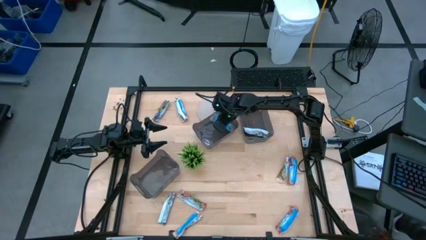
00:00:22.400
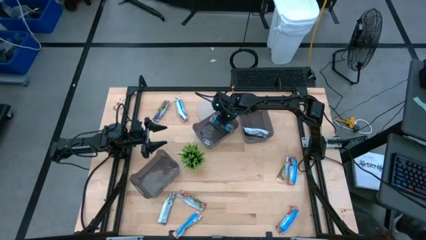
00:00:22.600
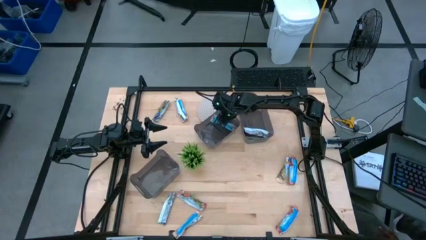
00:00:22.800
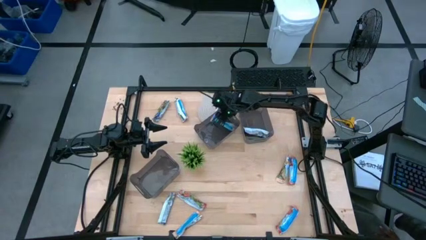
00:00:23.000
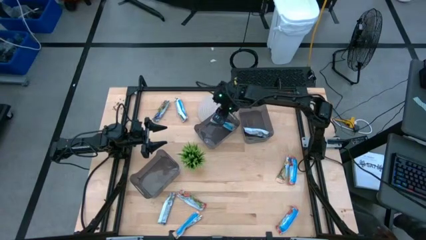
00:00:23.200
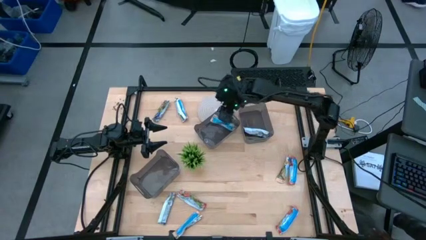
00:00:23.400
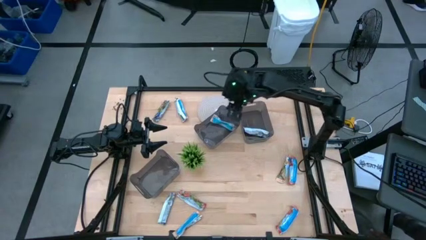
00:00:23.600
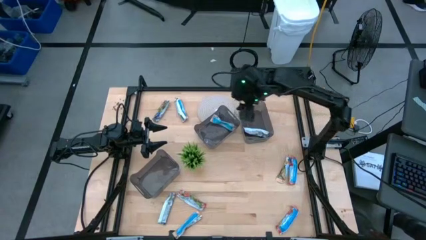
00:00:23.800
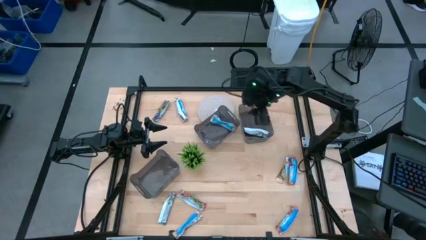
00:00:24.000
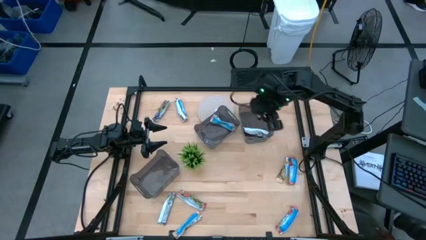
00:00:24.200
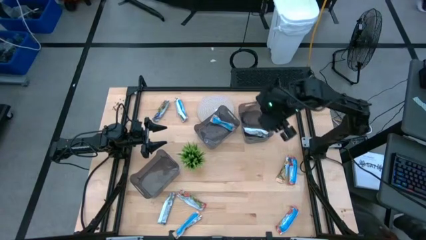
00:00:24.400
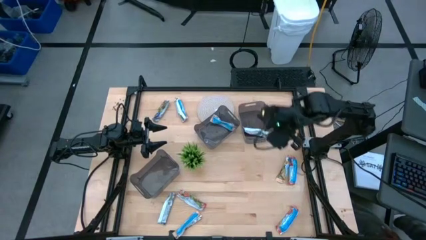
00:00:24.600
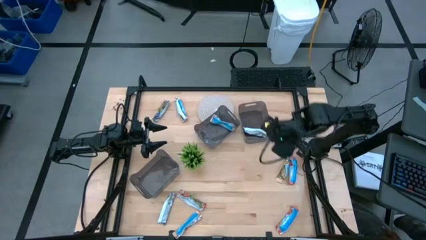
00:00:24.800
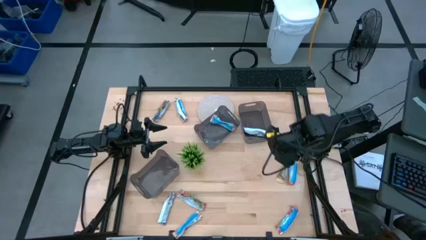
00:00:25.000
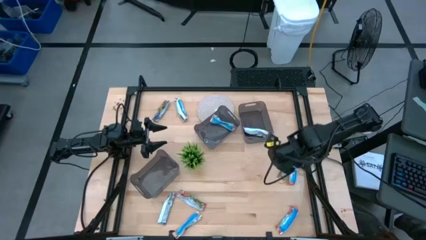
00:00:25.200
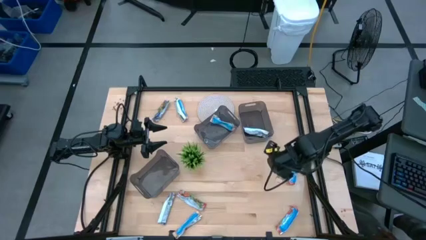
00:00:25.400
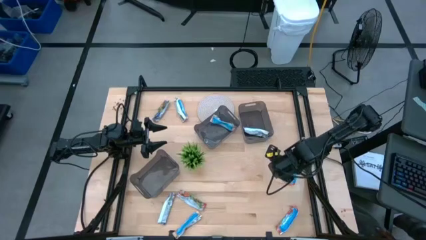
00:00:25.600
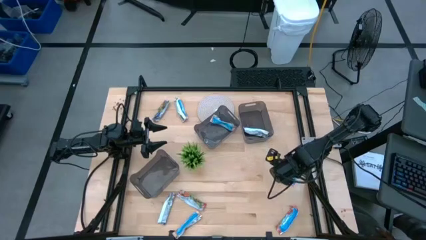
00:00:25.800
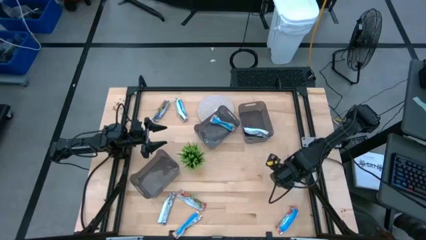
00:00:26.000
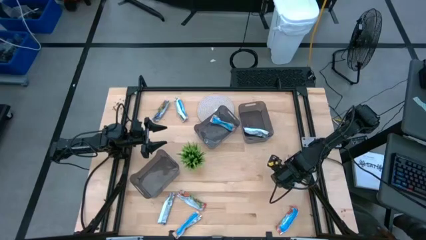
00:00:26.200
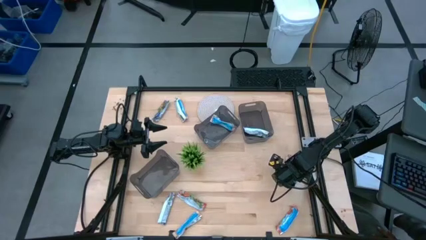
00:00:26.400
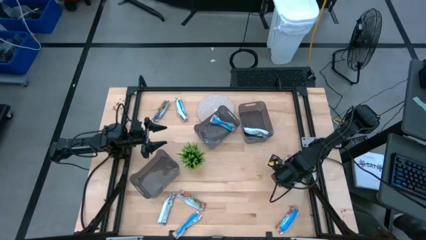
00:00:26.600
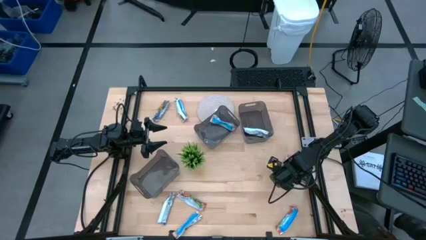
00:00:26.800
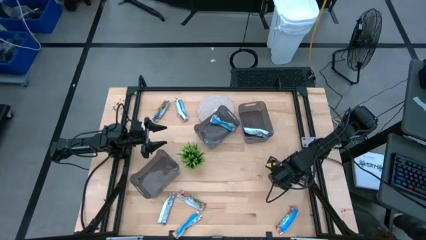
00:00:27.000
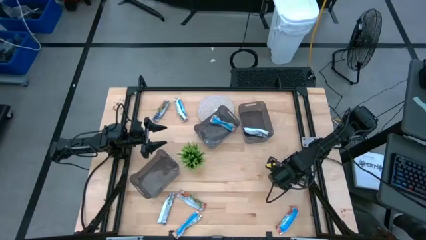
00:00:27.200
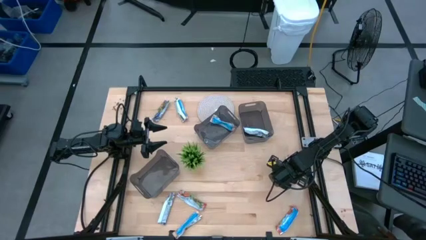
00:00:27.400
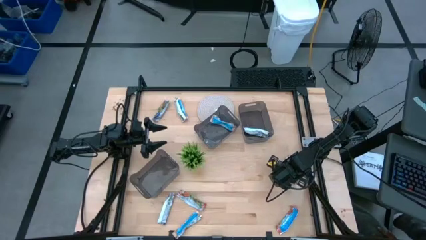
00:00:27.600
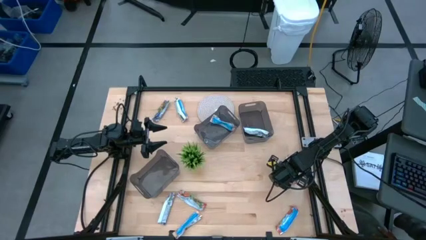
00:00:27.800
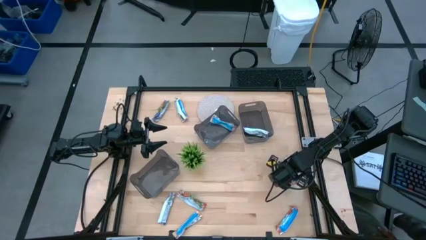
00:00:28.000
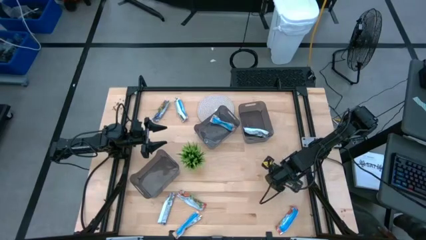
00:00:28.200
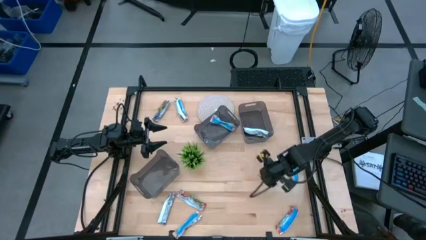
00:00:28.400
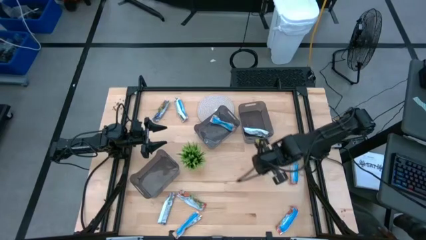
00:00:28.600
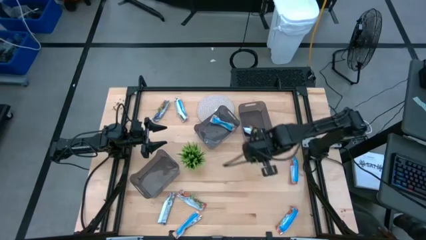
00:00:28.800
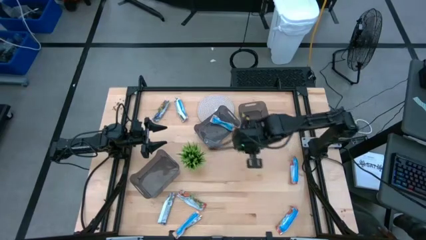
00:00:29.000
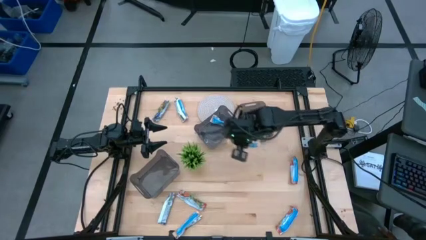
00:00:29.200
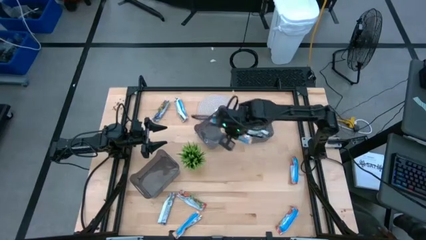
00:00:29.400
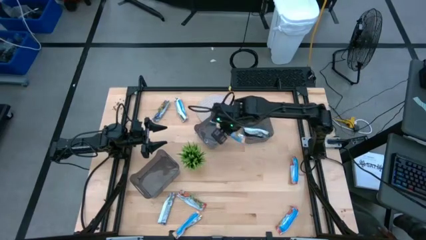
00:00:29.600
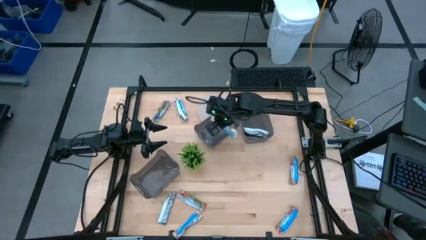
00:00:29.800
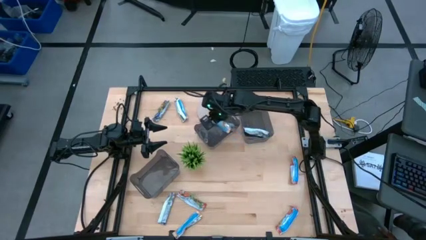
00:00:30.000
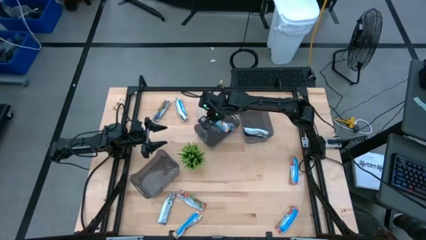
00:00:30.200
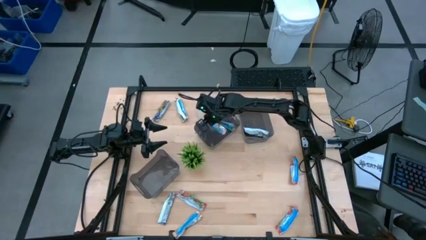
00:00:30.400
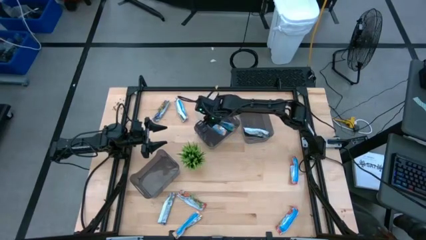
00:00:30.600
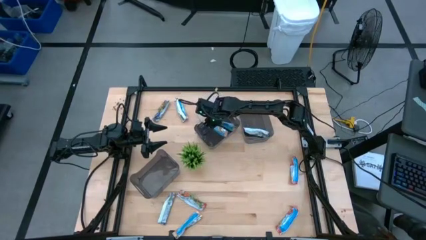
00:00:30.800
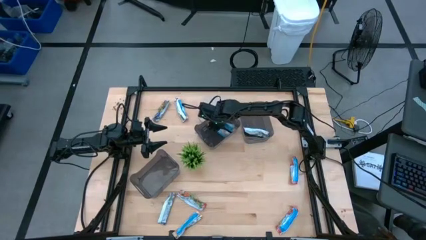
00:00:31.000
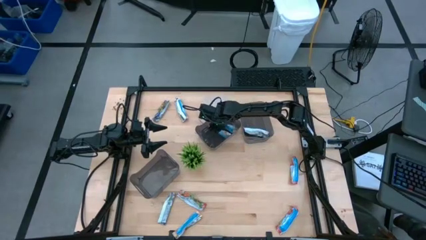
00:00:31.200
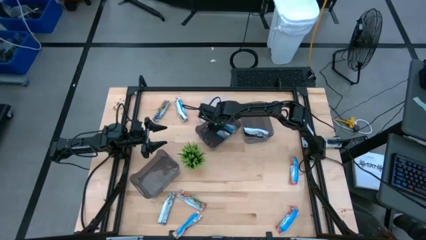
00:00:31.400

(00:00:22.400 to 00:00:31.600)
Task: Pick and place Granola Bars by type
Put the yellow granola bar into the top left black bin

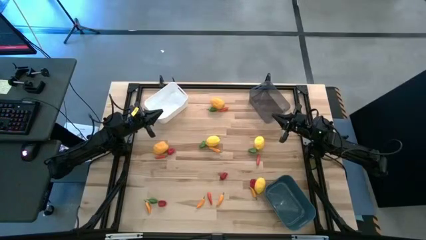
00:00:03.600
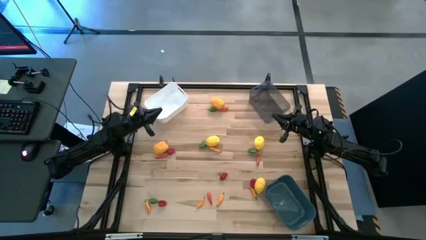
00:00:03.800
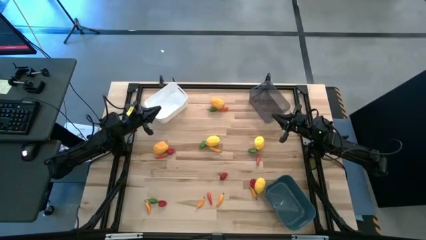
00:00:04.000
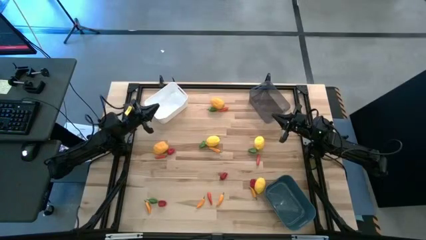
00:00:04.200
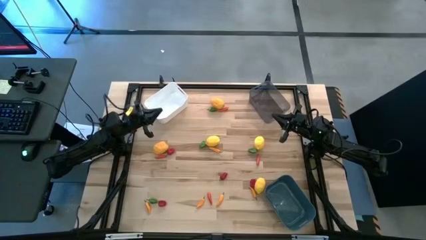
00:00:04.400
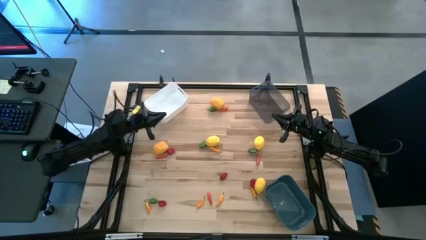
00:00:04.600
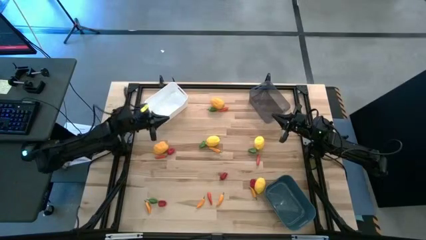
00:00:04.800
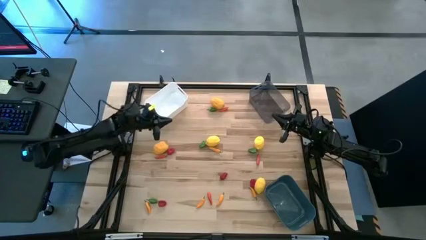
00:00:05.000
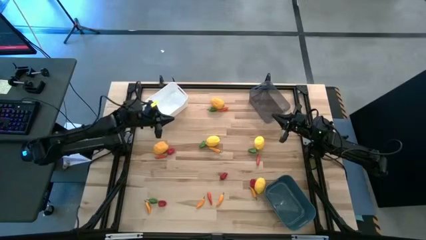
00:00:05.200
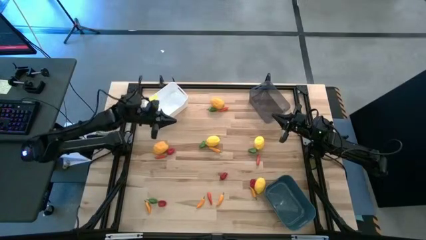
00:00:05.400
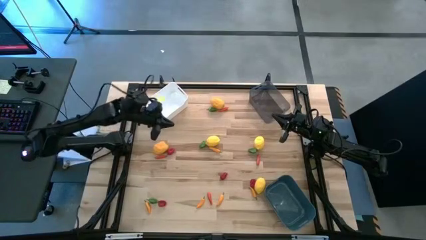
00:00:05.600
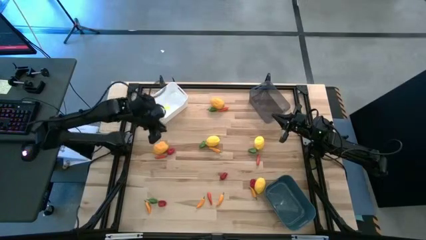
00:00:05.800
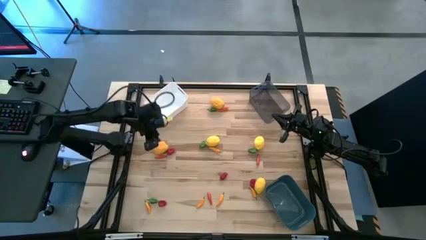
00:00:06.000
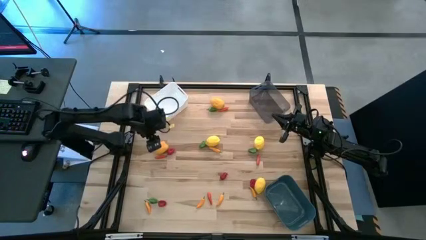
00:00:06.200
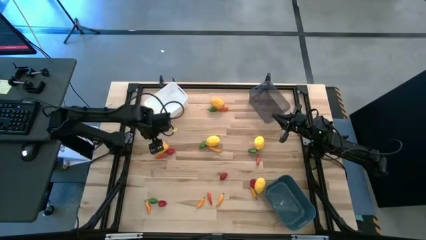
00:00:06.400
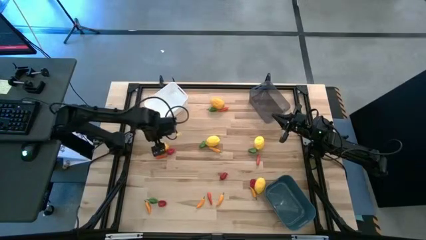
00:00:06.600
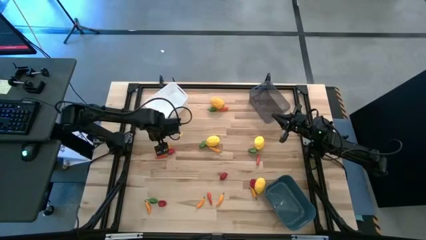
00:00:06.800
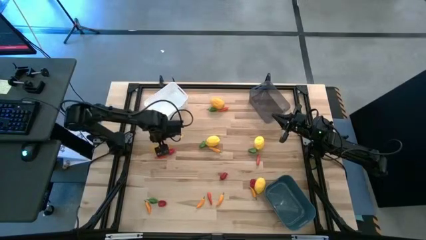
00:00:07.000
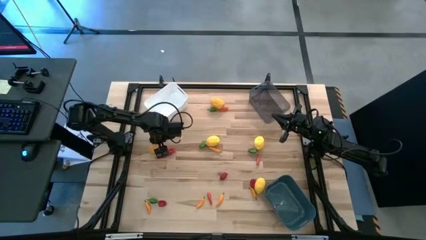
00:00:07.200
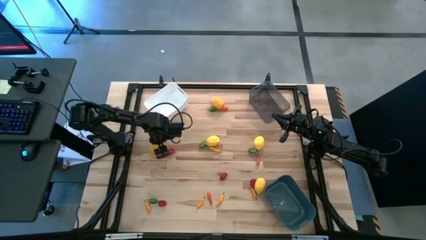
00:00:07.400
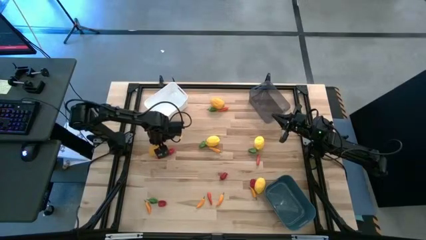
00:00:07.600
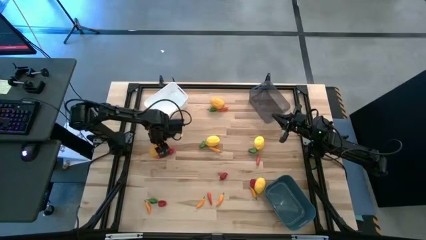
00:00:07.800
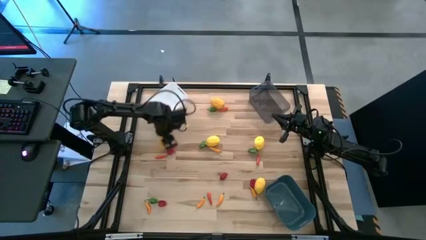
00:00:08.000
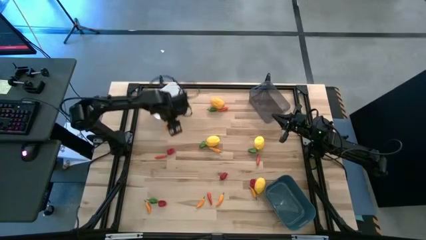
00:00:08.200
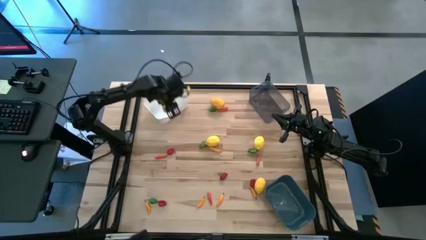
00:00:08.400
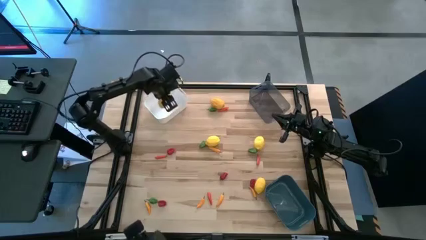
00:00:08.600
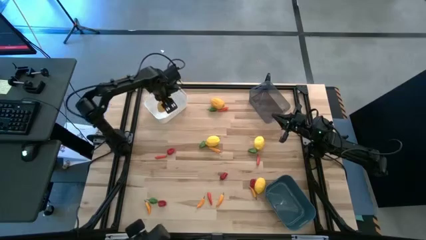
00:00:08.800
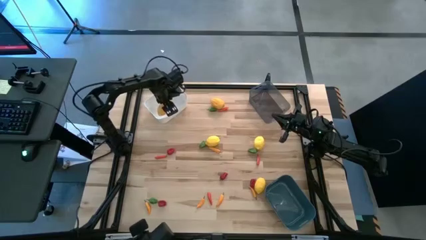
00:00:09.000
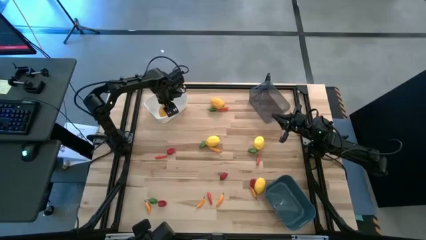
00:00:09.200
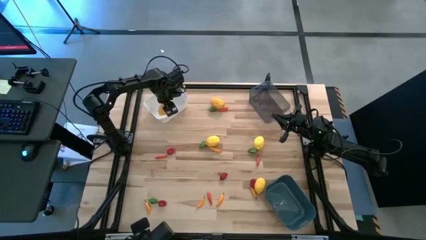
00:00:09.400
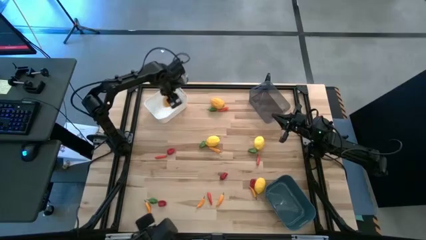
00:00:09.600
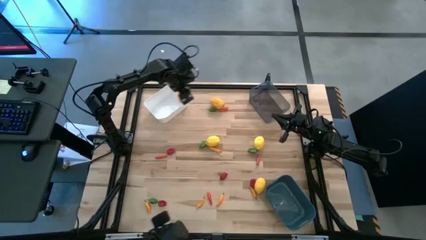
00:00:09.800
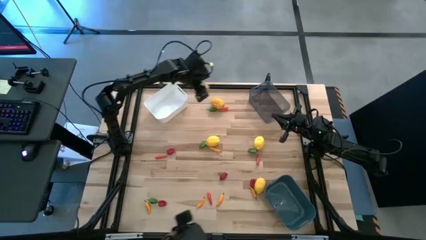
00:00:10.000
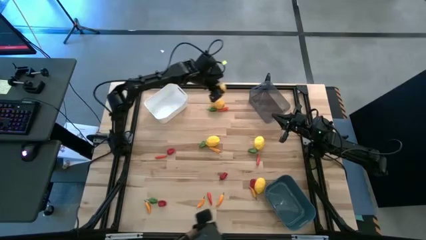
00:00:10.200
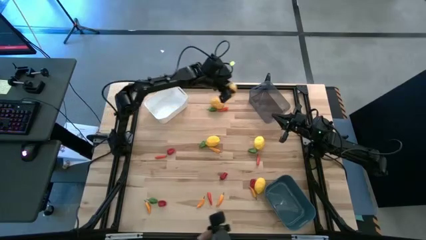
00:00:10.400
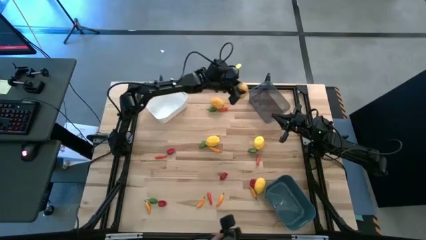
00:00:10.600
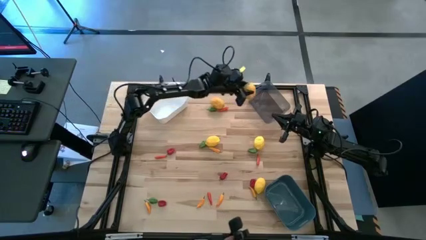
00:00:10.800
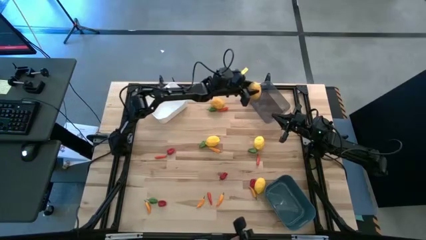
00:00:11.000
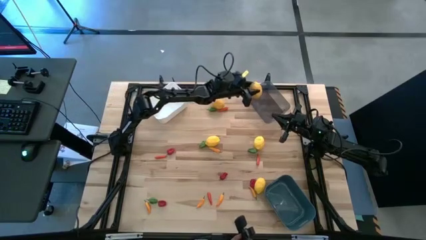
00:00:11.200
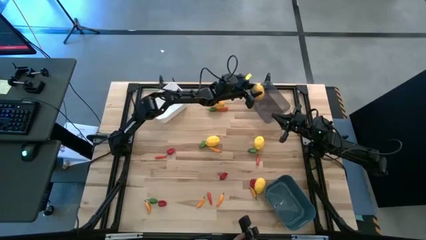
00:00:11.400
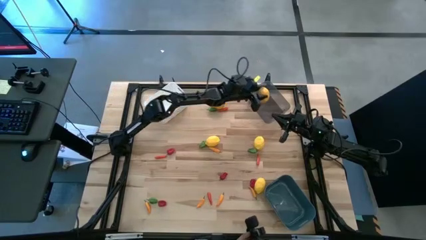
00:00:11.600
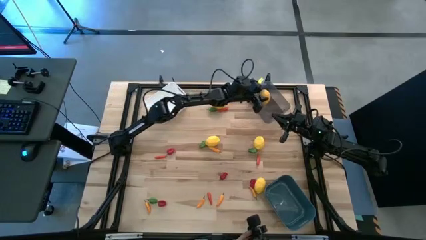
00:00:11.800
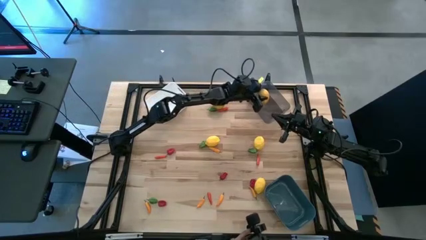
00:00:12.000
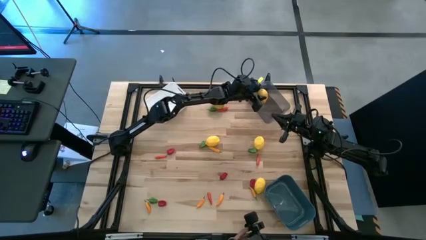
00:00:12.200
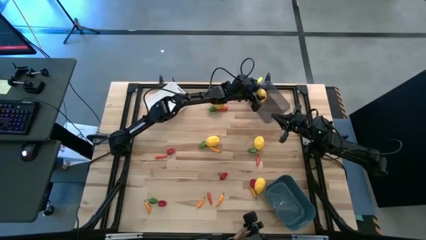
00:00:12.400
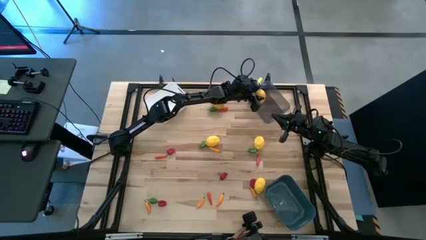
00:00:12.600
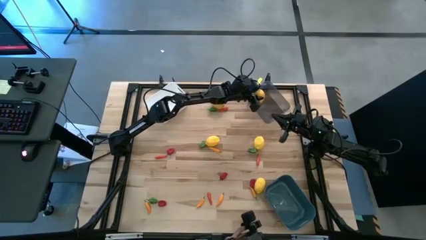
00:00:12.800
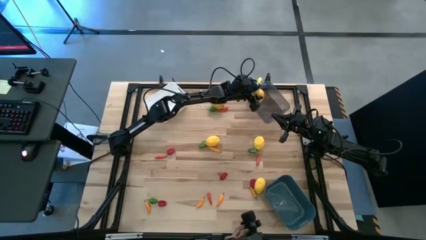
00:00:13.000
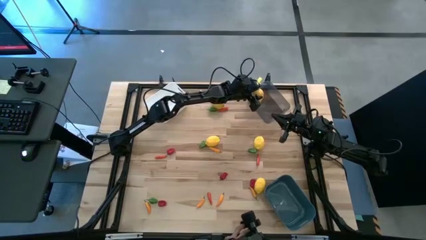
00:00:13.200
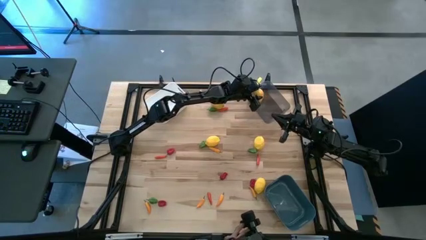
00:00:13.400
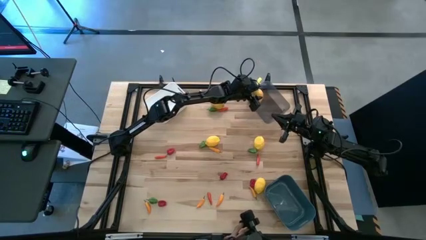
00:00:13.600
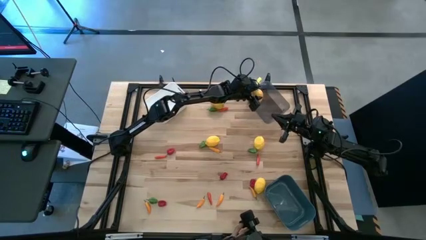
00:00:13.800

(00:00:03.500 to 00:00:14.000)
Task: Sort produce into baskets
Put the lemon into the black bin
